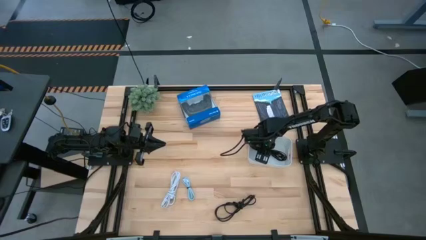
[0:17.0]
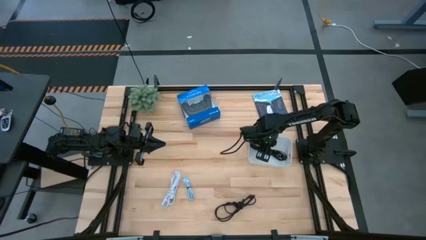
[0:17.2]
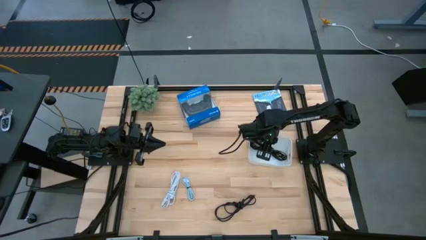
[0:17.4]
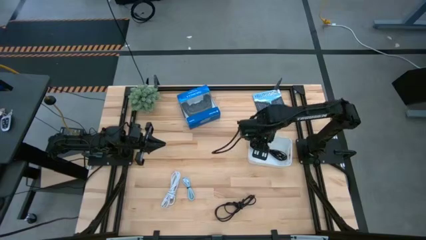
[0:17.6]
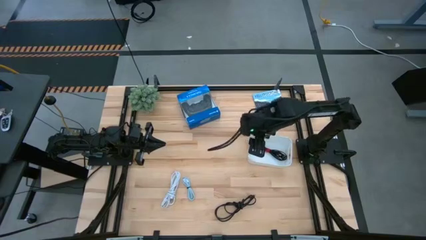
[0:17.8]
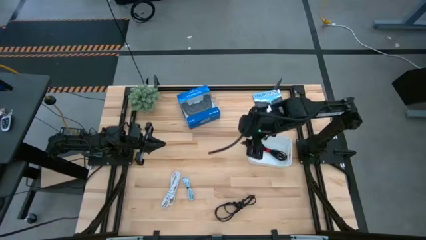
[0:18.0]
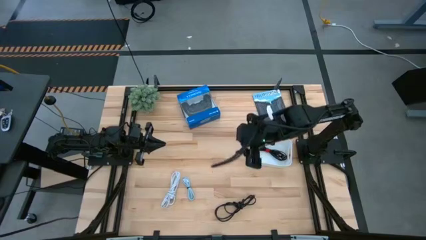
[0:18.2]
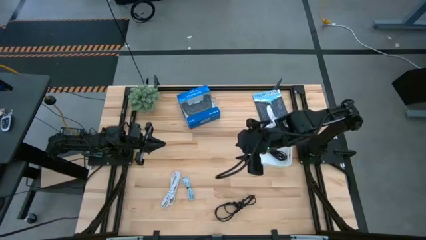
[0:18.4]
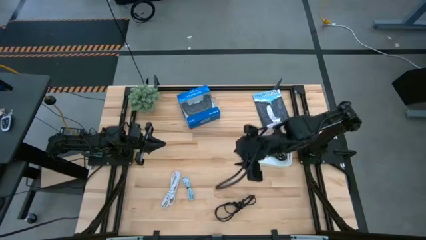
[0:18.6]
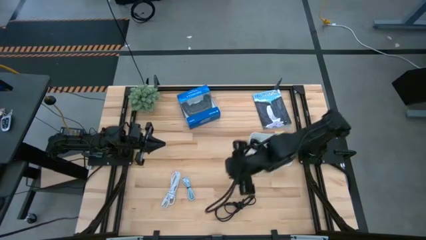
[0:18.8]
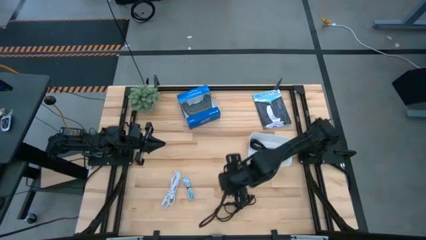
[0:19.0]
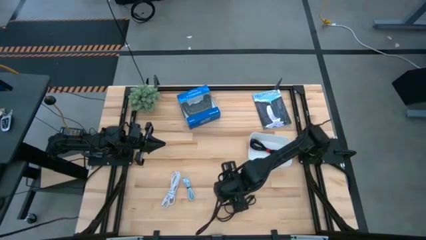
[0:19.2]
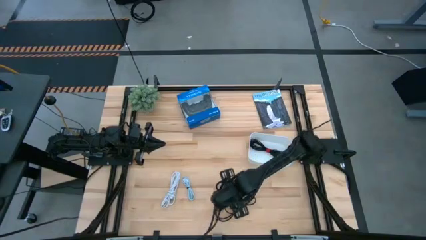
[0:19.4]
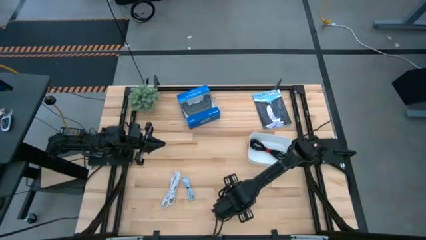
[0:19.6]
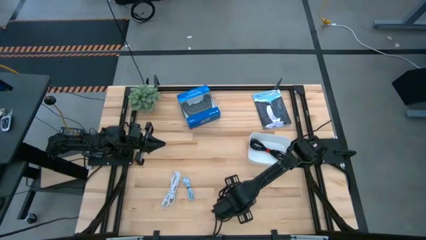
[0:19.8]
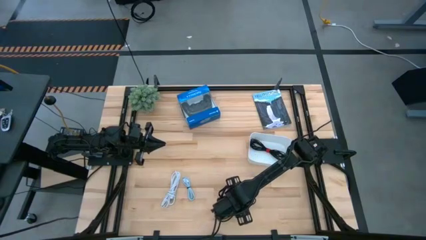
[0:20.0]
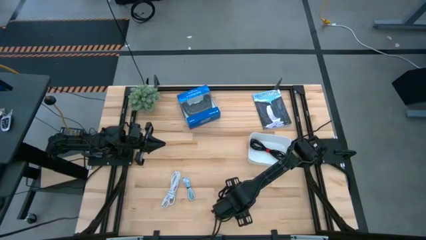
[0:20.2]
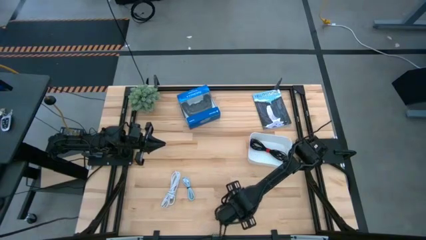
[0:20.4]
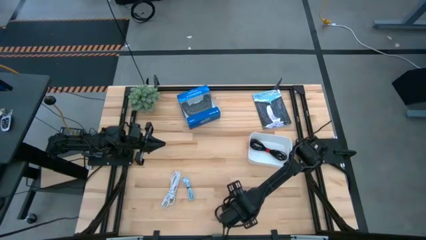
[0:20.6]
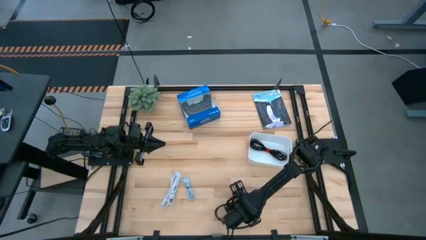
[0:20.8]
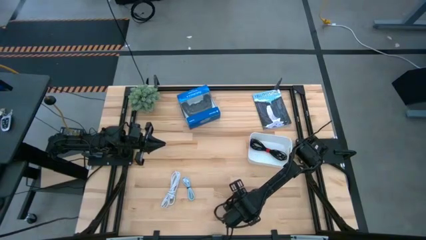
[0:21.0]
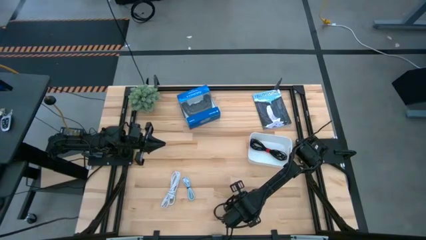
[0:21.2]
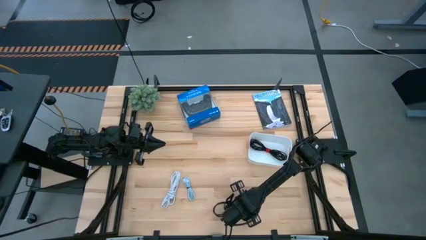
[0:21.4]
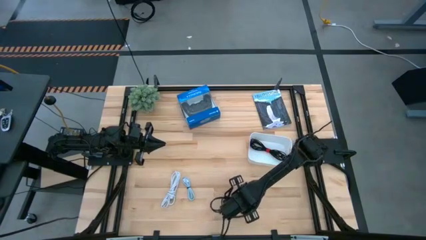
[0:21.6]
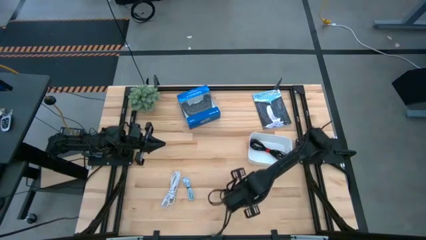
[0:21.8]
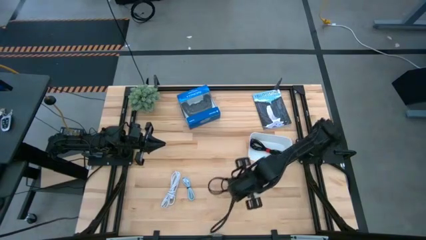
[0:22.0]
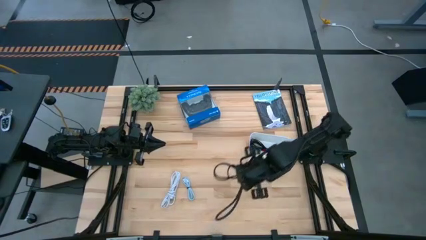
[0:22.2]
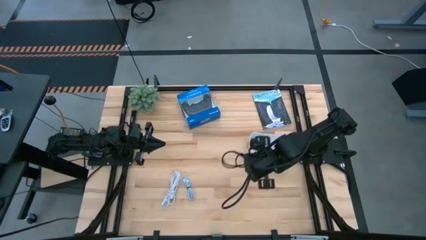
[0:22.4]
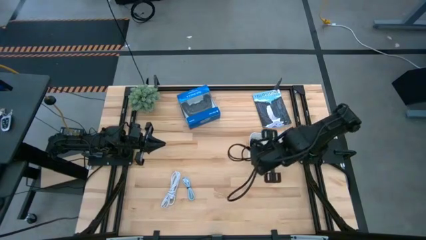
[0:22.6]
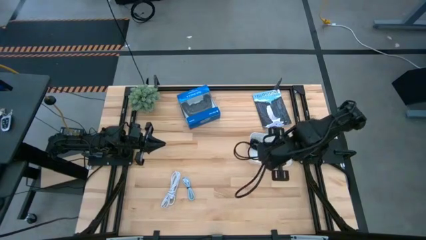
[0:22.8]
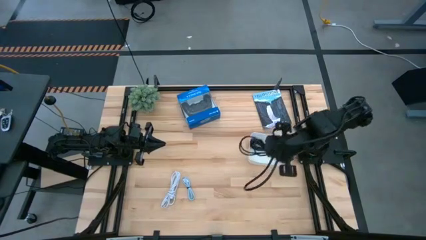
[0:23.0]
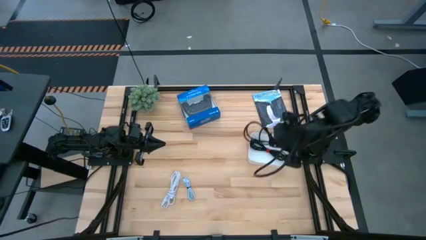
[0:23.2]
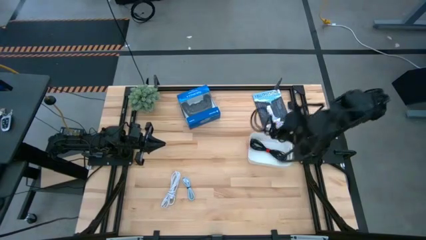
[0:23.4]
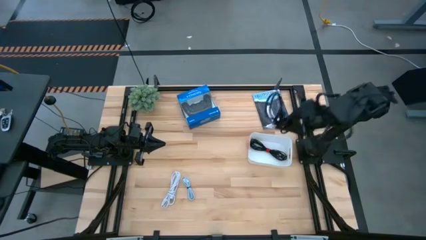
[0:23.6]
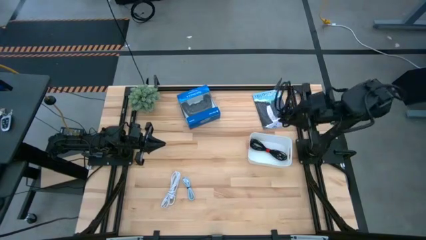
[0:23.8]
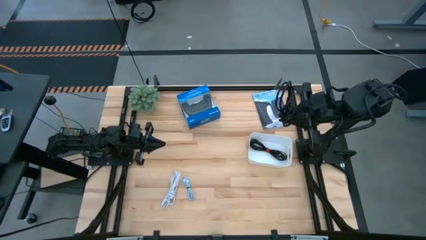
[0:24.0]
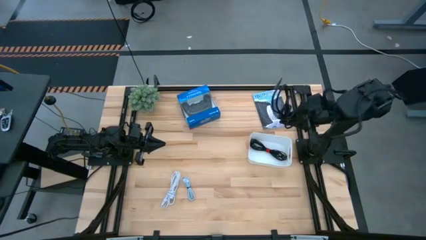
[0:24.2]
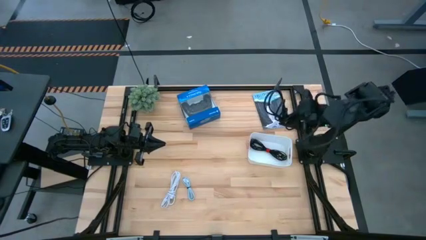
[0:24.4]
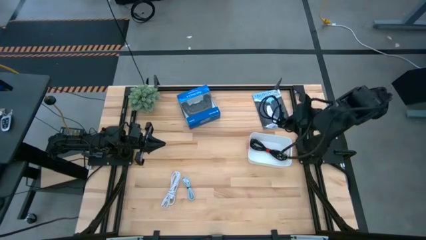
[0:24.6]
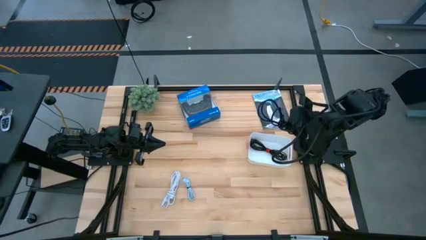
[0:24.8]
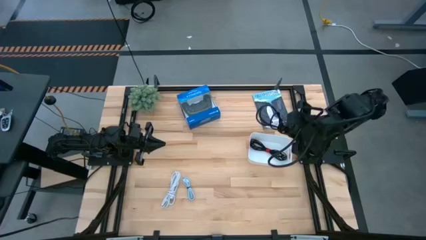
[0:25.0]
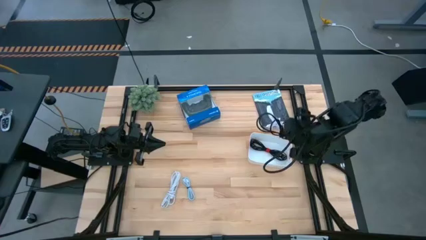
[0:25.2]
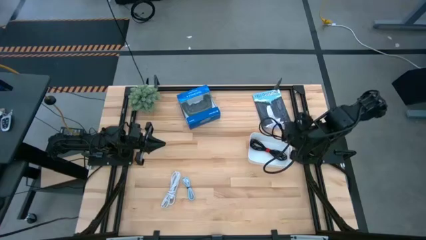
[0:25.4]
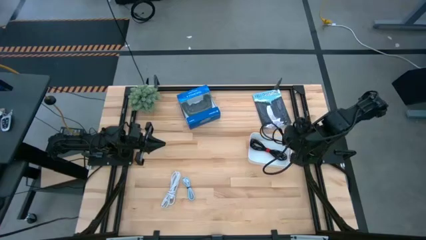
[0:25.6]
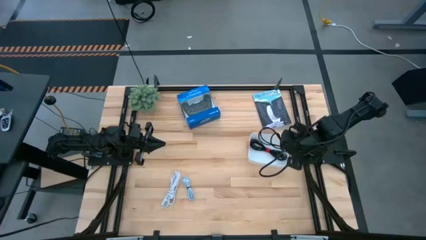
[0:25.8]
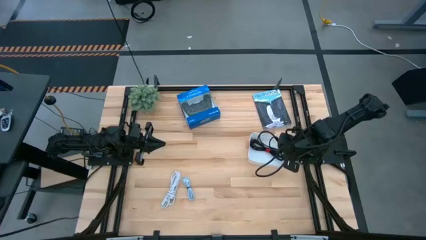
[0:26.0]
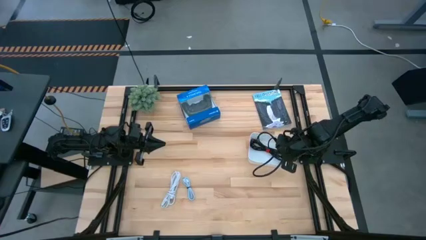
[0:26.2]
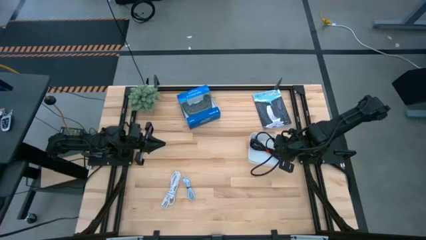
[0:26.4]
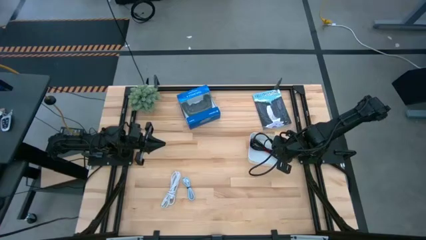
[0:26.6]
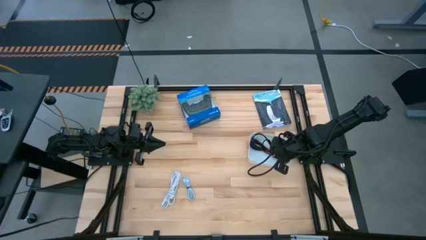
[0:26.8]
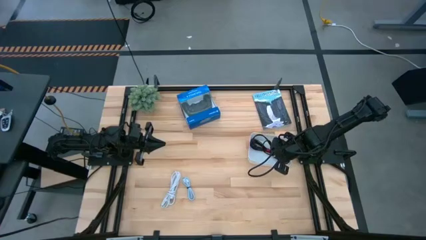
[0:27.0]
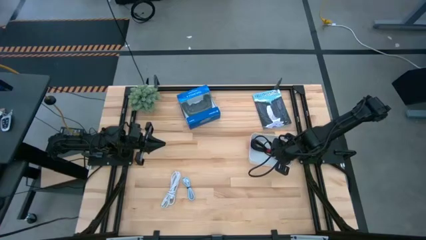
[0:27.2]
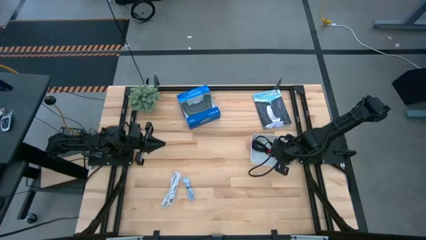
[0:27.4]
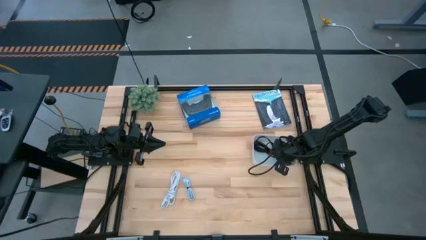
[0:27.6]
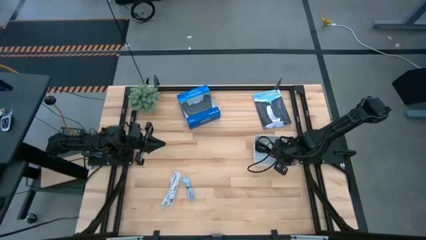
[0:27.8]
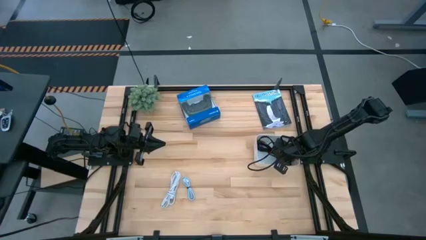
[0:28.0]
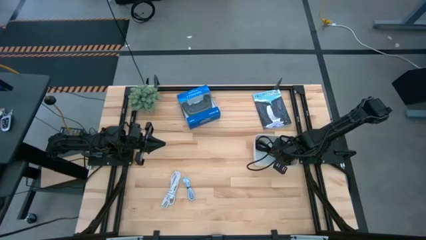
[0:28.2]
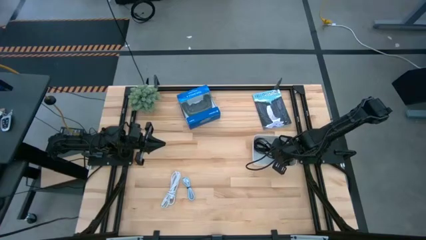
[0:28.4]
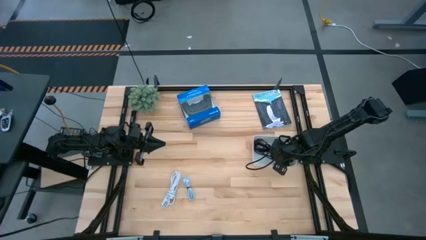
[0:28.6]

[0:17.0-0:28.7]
Task: Pick and place USB-C Cables
Put the black USB cable into the white bin
